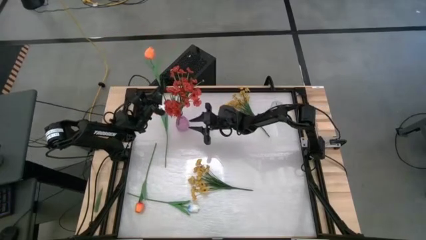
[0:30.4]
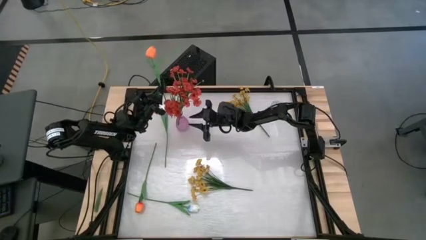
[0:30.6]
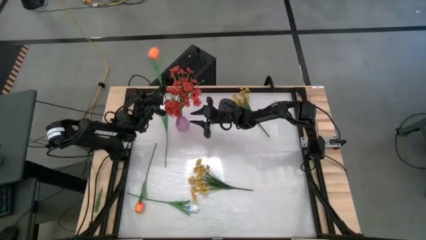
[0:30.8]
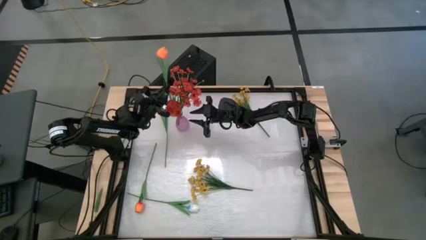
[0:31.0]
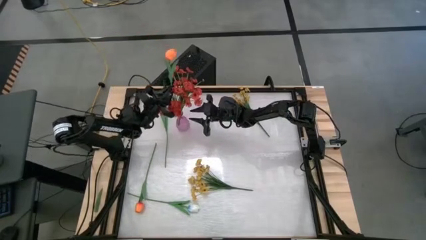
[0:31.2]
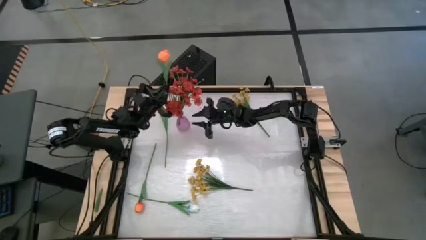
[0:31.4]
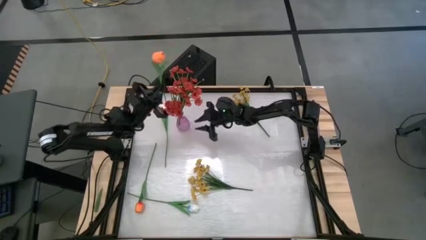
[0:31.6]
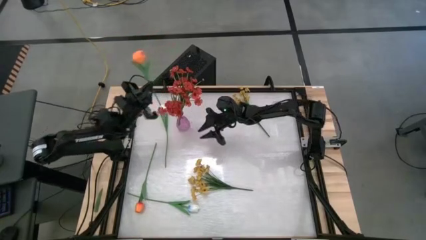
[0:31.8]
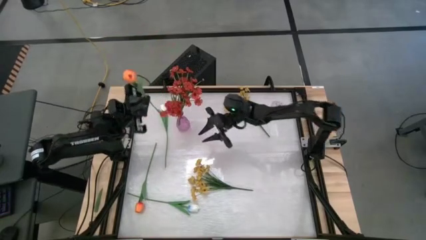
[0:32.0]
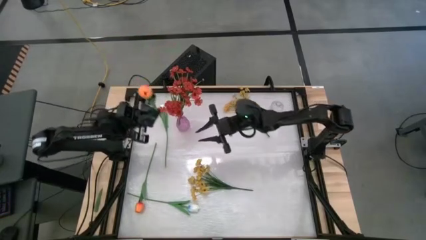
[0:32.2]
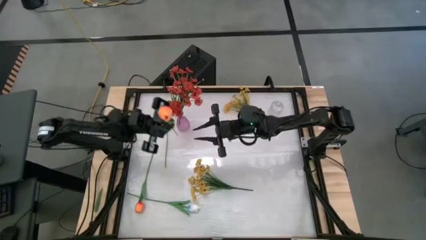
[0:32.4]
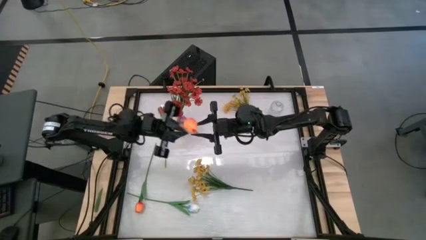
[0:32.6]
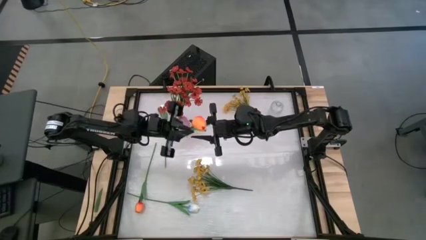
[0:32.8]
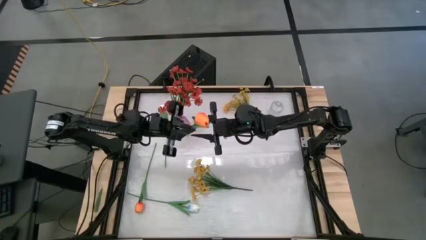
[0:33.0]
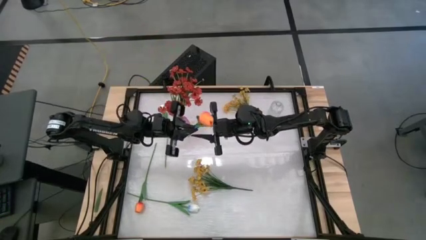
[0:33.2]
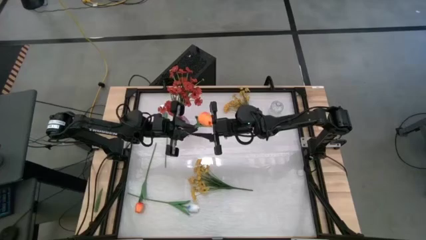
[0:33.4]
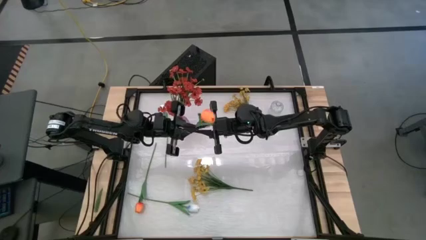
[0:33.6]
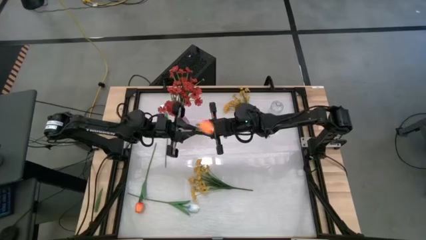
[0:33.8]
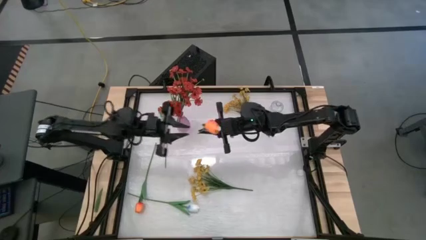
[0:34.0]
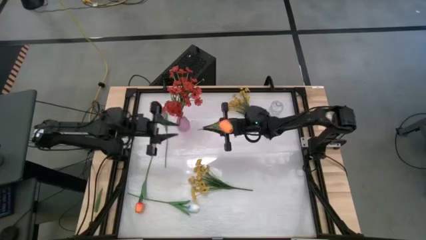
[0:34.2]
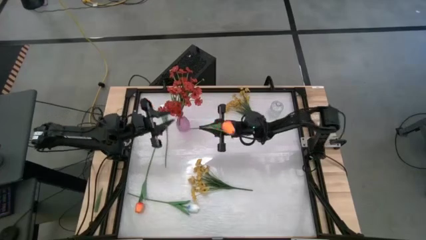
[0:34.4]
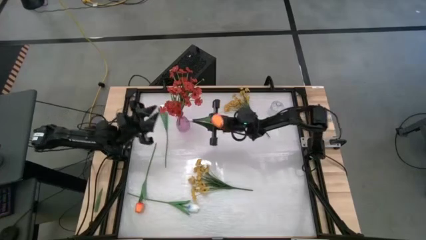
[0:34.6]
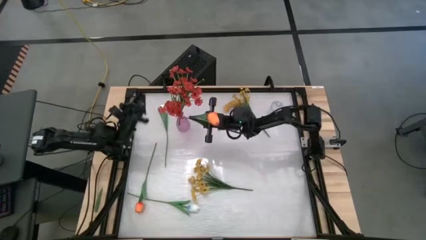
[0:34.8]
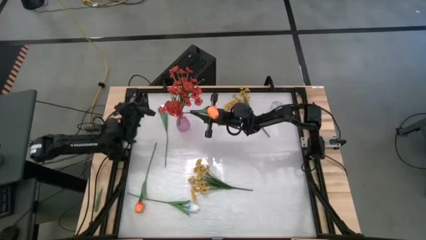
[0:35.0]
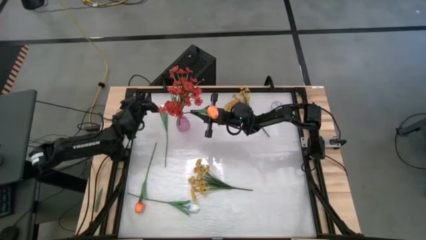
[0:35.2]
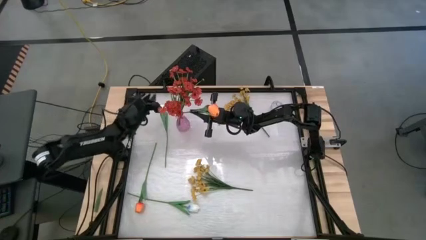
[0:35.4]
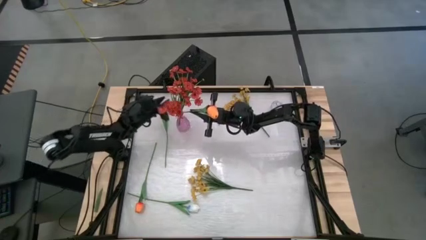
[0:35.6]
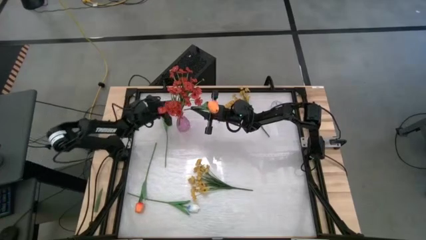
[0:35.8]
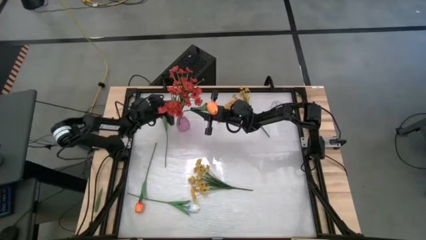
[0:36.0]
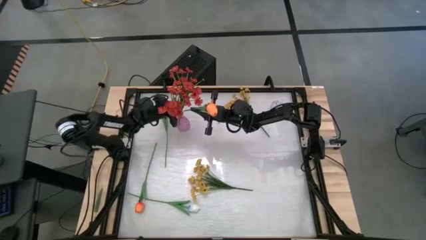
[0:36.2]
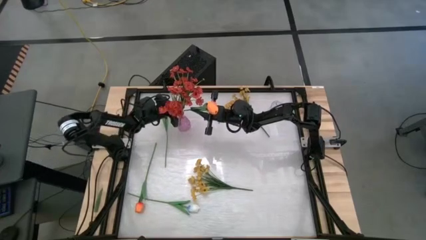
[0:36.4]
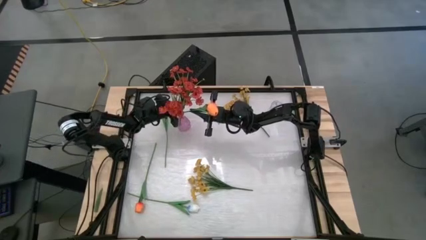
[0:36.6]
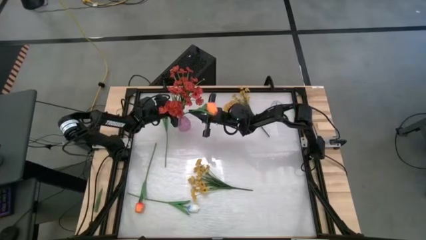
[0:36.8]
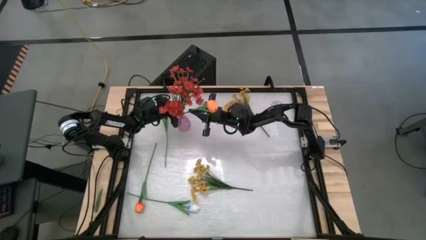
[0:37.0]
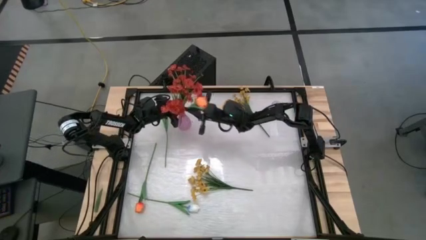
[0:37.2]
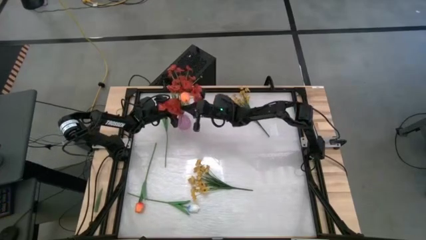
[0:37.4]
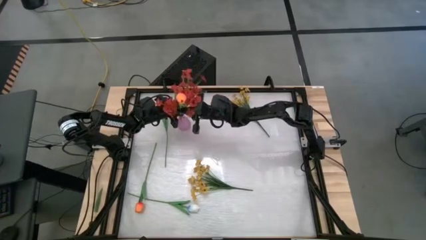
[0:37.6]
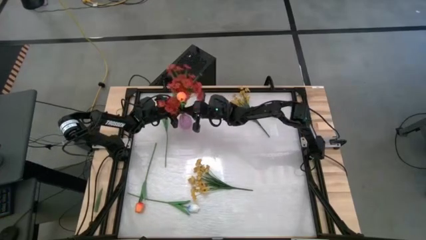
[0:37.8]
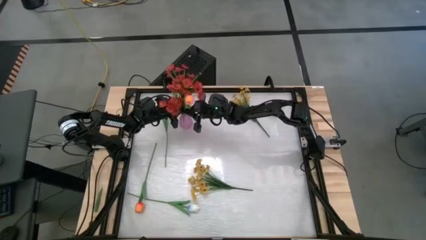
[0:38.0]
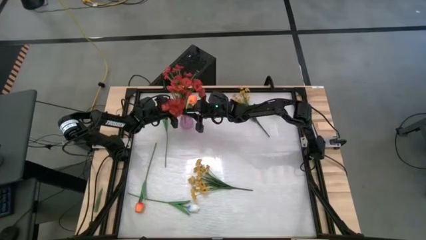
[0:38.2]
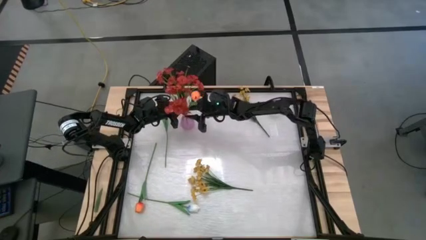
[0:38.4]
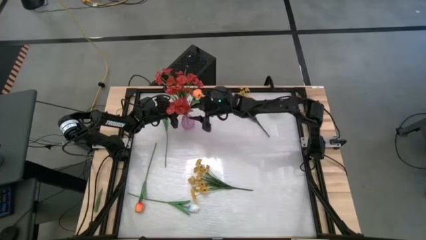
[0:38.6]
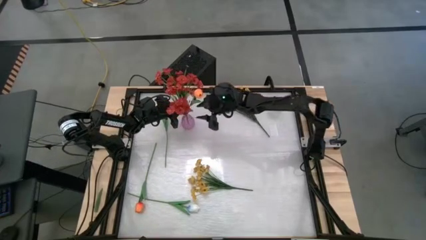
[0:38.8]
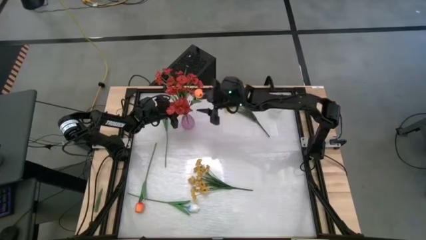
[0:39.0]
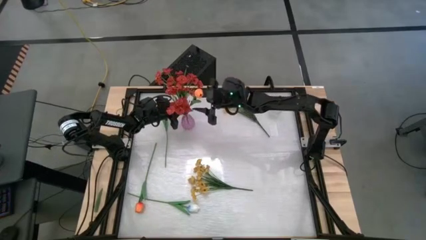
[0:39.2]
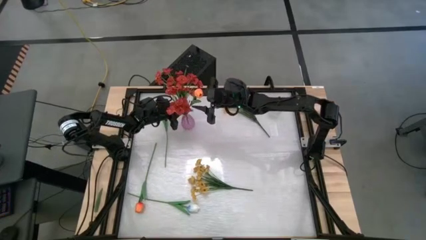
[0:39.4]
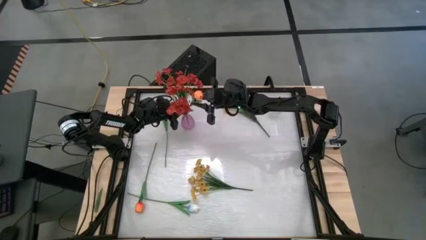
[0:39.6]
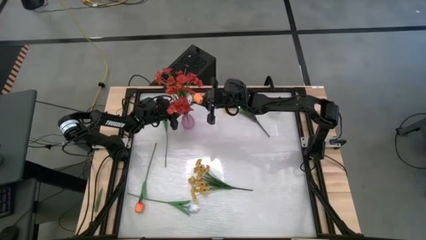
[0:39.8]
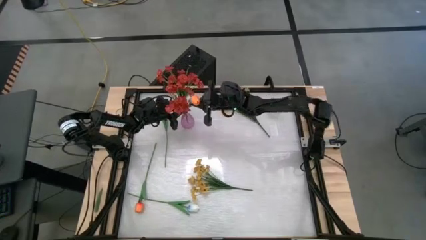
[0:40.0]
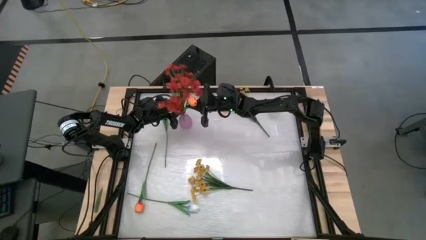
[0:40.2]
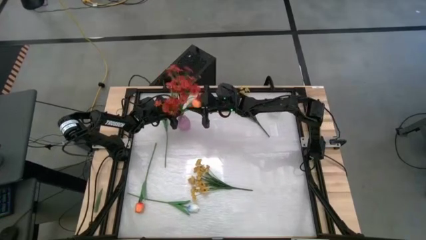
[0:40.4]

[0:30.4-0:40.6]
Task: Sort flowers into vase by color
Put the top orange tulip into the pink vase
